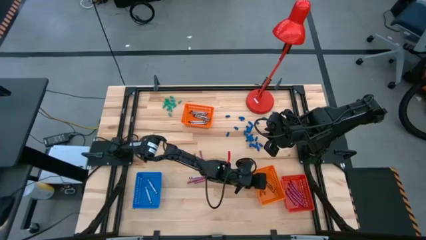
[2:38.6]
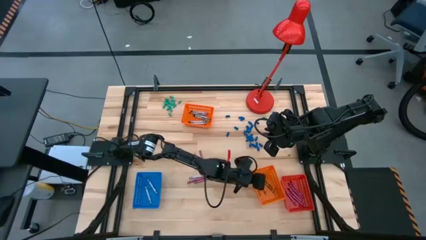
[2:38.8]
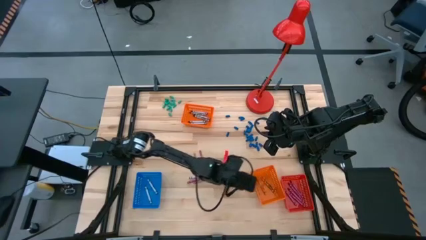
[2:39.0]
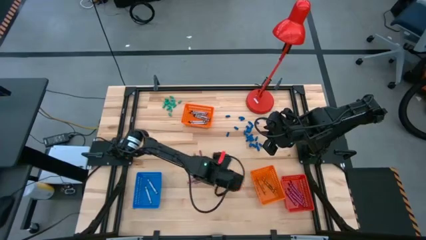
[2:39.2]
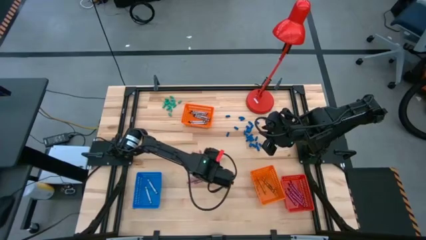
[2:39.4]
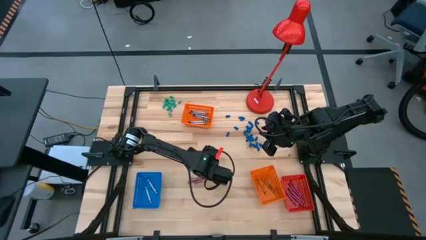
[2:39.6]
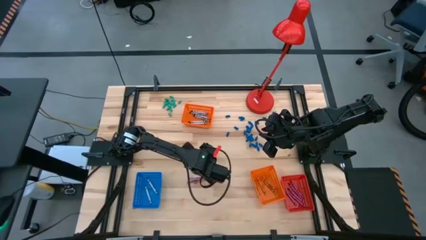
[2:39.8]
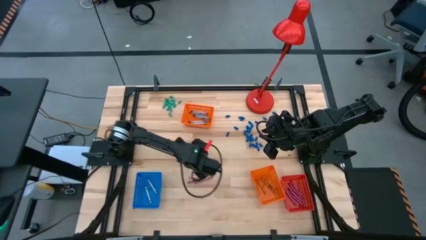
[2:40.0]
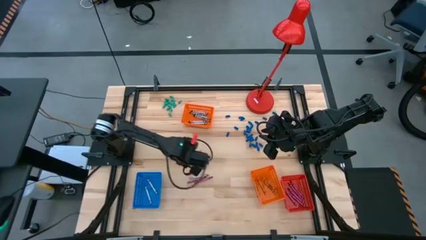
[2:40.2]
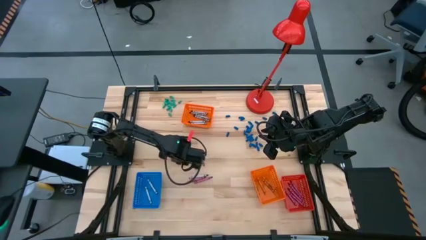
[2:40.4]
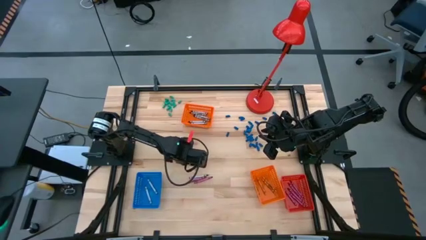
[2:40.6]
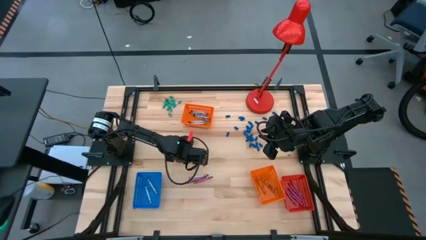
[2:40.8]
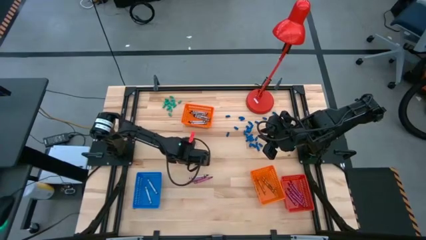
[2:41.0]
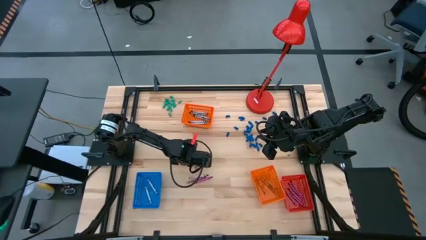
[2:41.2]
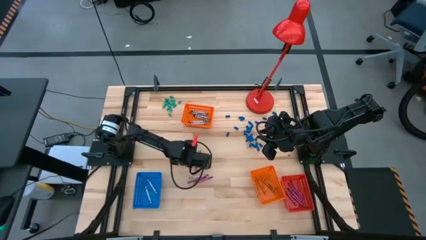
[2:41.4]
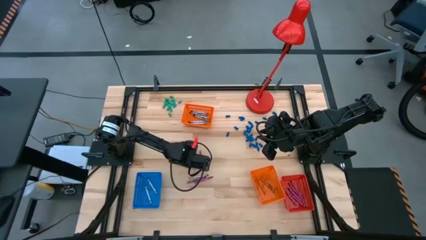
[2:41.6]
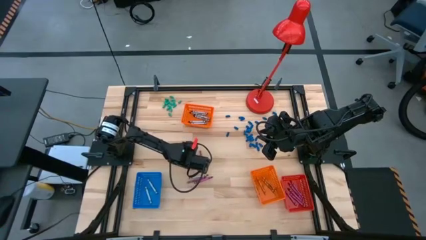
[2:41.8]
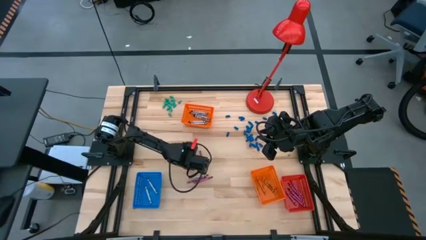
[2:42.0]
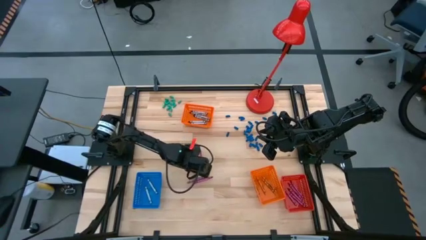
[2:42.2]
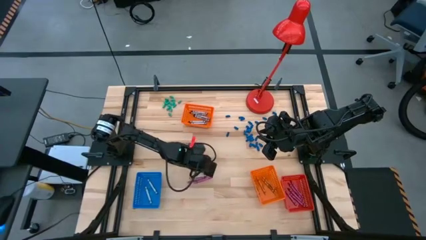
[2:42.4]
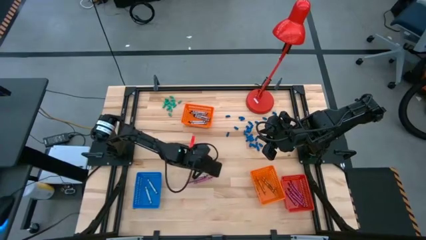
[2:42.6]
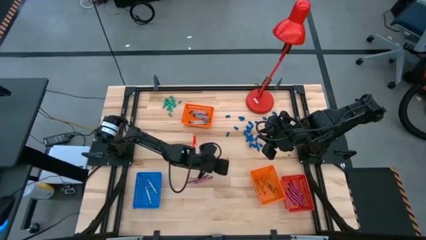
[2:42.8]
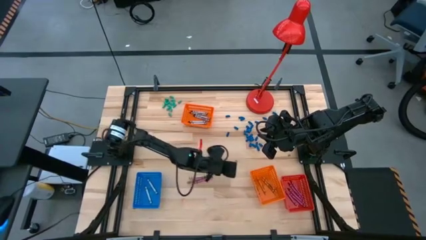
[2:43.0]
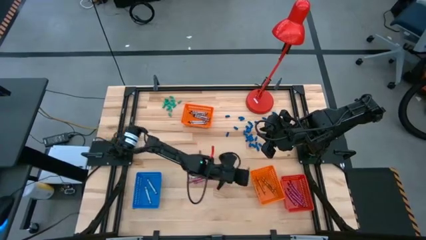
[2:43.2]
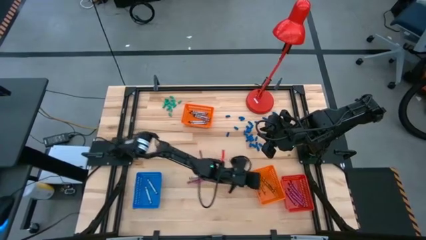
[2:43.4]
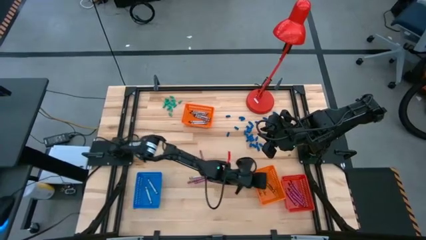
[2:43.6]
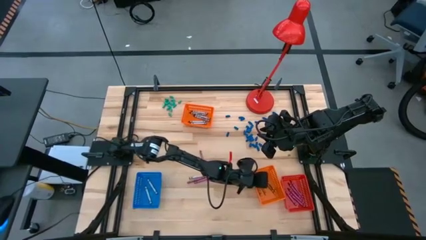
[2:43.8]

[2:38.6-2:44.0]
Task: Sort crayons
Put the orange crayon into the bottom orange bin

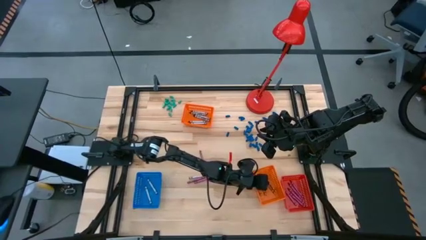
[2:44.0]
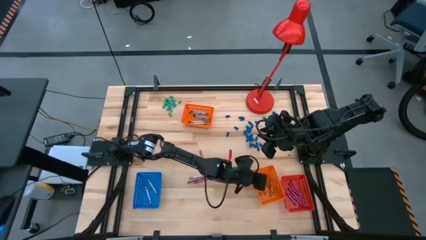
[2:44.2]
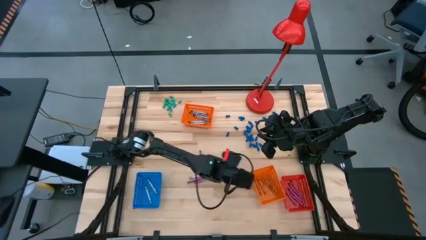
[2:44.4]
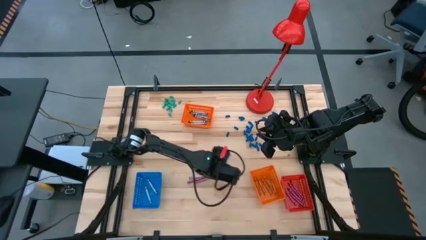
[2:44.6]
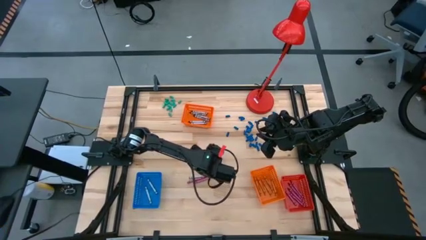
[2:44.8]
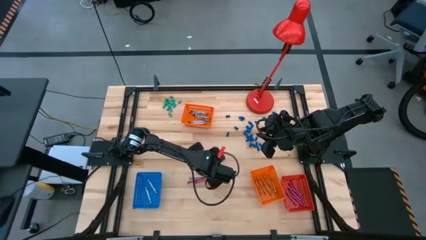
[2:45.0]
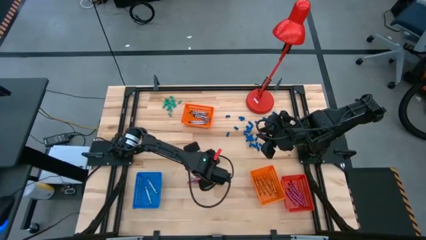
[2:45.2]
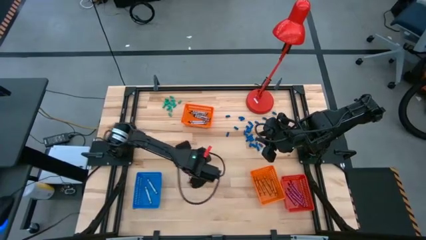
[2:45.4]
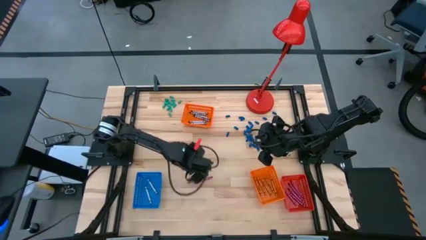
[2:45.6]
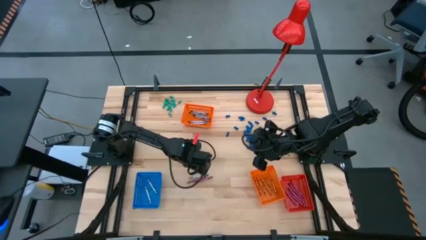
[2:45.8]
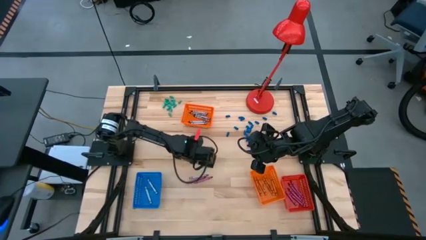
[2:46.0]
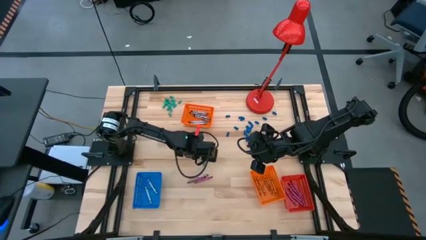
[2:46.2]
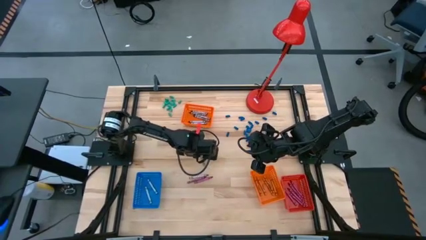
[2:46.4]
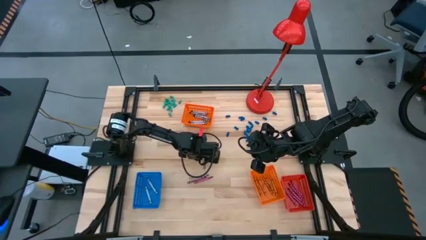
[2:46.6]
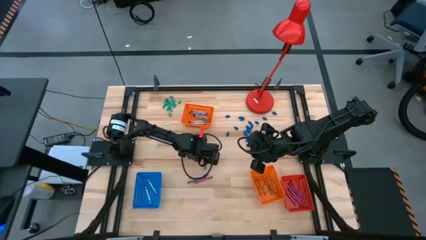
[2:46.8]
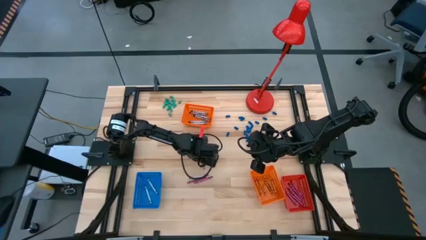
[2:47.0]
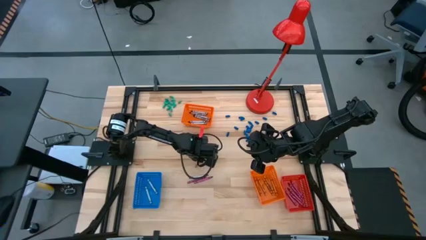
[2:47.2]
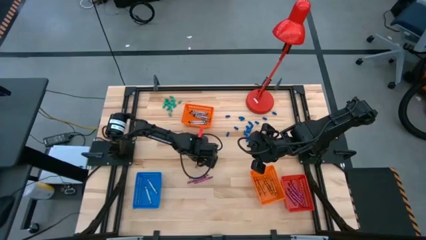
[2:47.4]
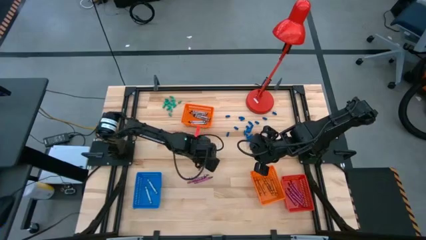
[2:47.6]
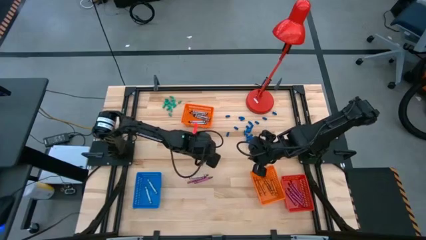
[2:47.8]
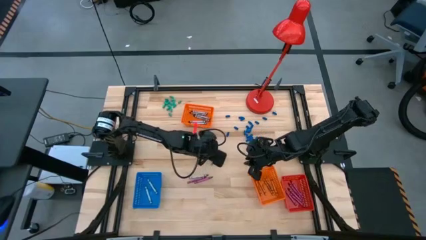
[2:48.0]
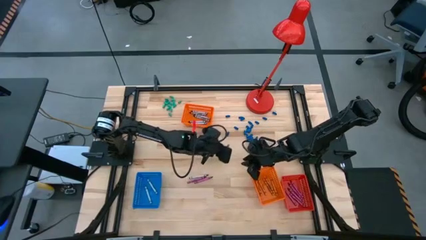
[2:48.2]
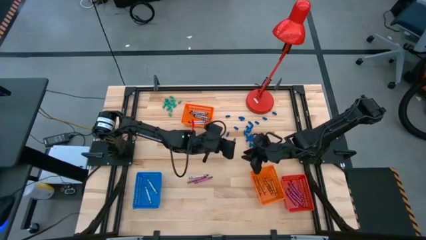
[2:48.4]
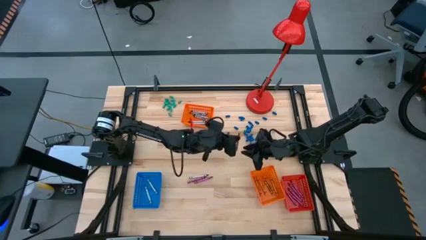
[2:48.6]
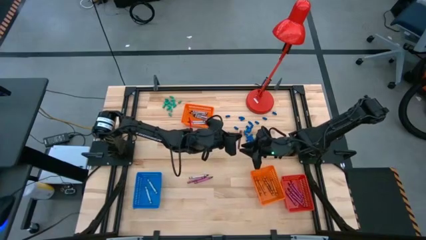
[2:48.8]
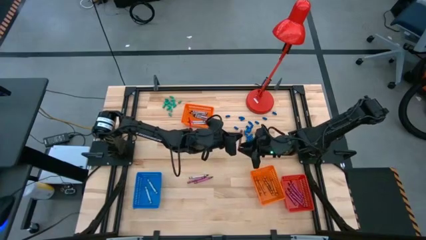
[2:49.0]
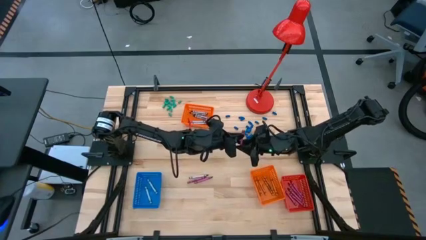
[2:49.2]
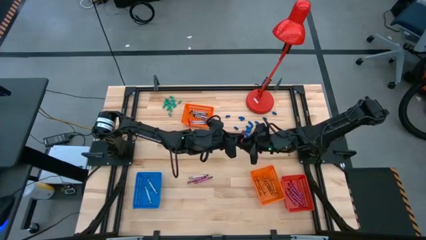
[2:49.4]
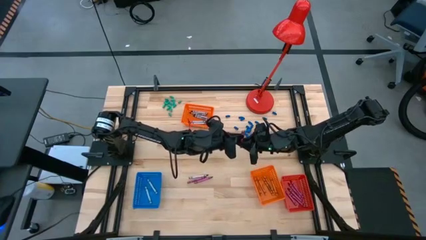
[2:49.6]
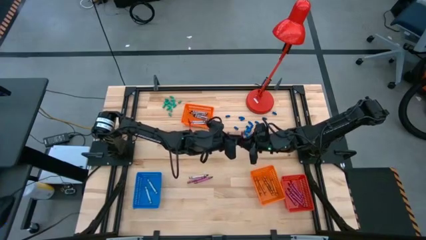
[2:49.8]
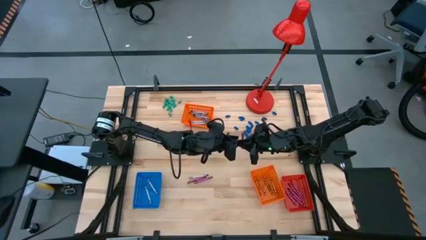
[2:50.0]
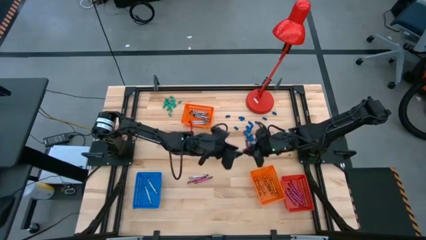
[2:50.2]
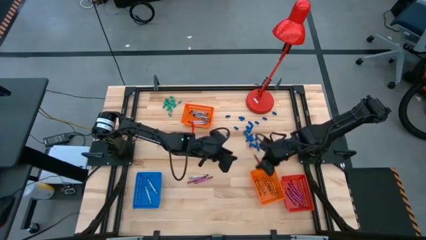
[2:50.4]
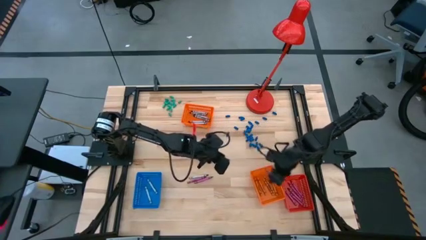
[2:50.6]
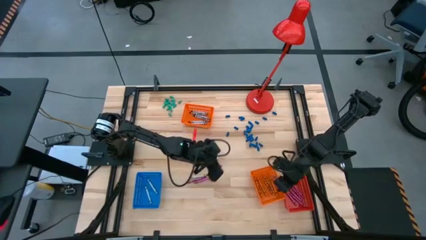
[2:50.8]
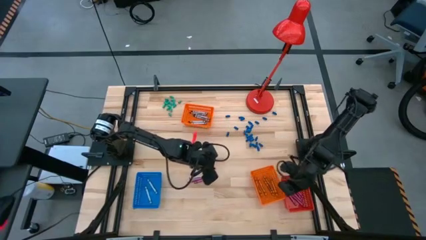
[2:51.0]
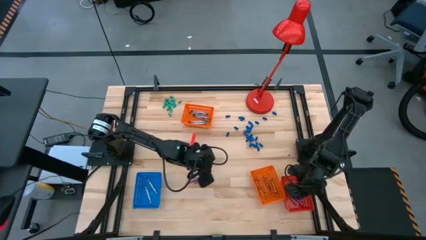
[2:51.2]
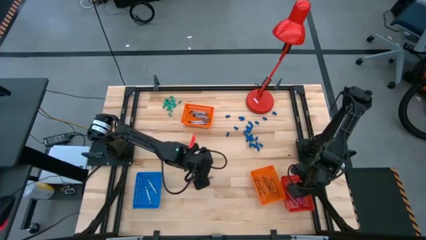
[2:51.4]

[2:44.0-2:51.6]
Put the red crayon into the red bin

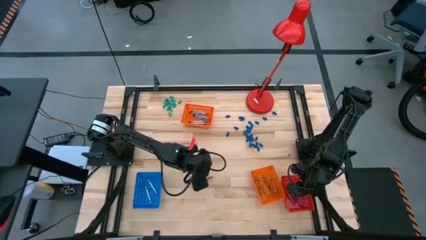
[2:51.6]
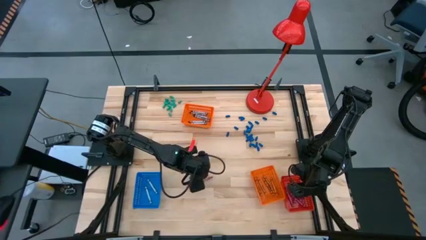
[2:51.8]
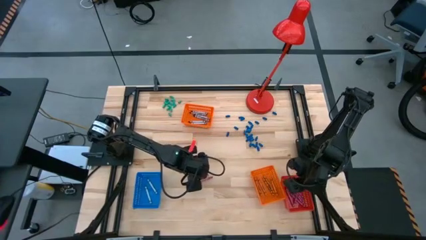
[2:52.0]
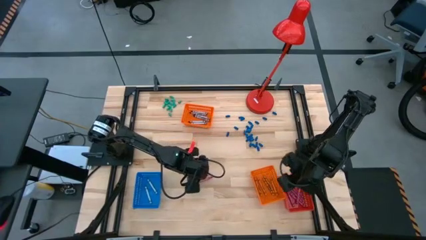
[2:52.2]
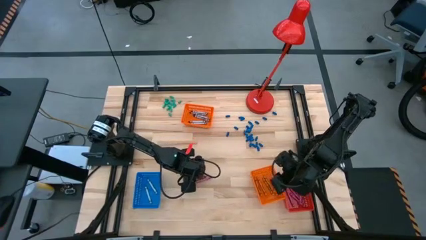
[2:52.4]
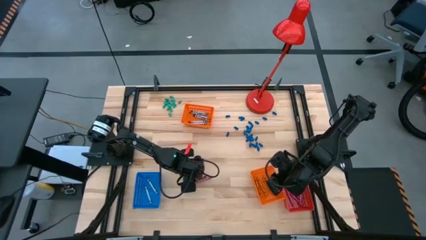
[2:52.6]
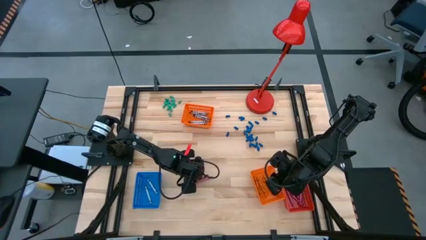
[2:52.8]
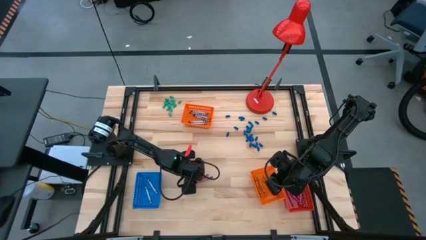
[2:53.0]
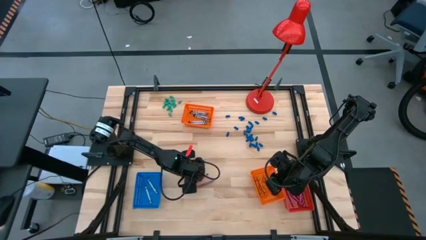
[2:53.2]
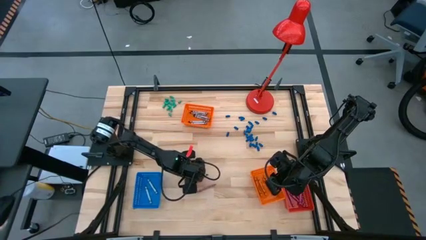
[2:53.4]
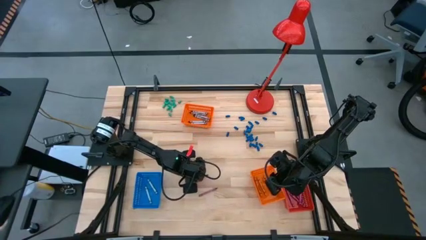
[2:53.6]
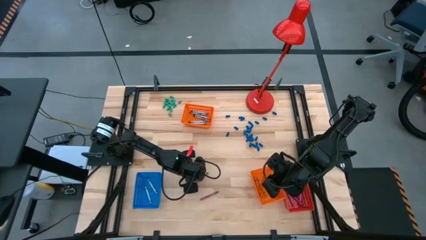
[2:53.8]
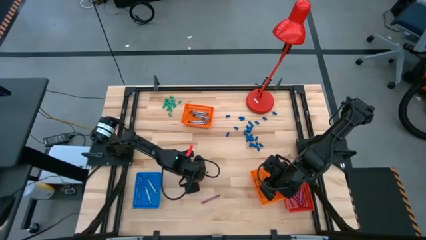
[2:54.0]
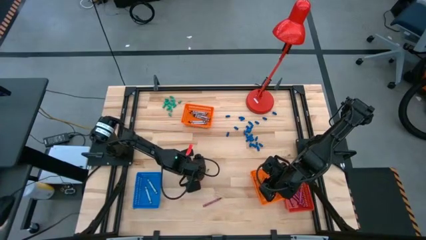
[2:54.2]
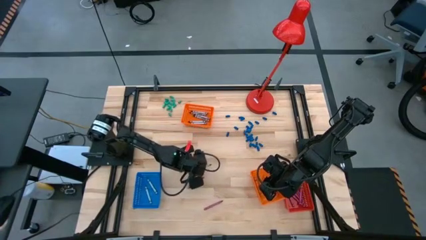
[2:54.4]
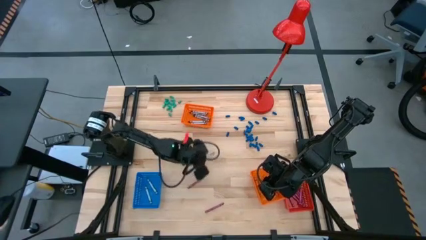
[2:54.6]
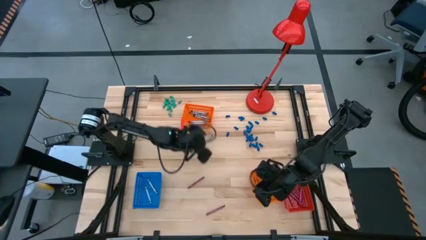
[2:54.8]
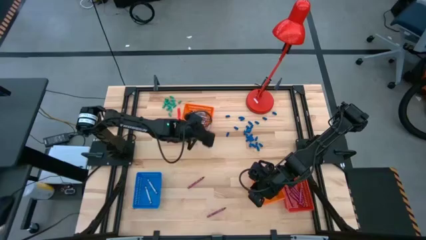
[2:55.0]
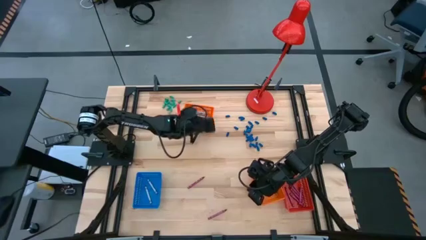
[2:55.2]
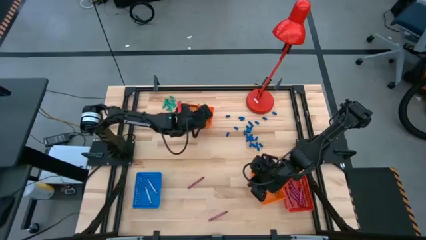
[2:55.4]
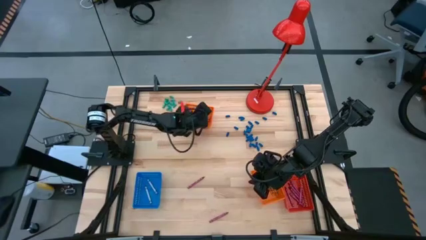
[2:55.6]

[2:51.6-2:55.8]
Put the black crayon into the top orange bin
